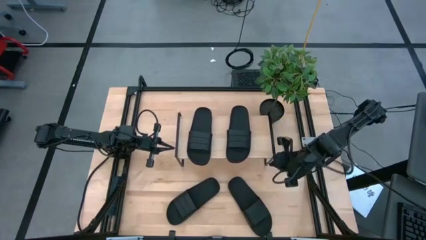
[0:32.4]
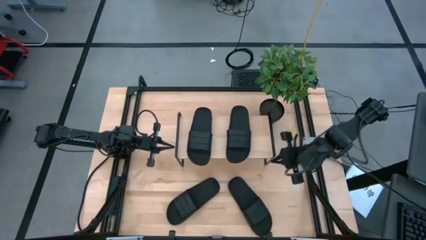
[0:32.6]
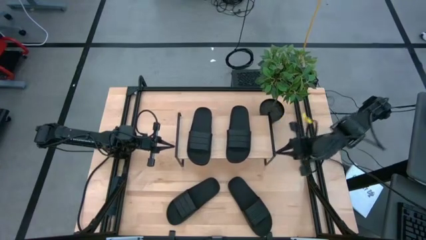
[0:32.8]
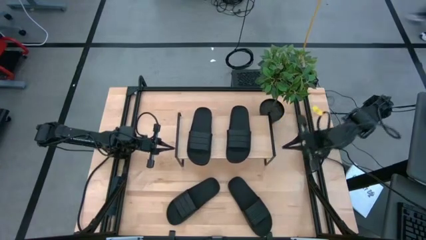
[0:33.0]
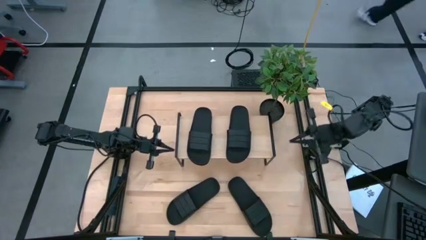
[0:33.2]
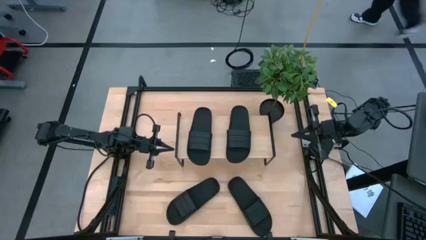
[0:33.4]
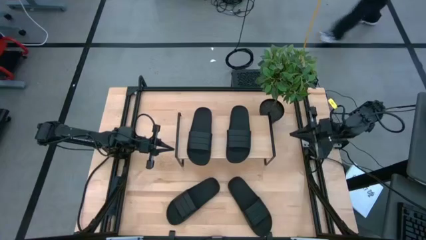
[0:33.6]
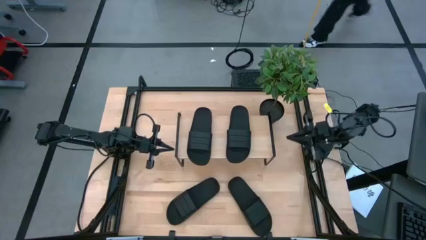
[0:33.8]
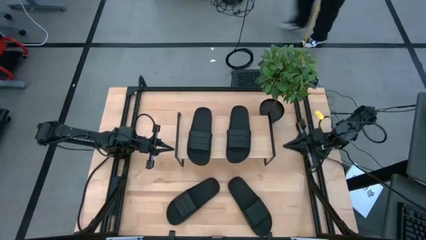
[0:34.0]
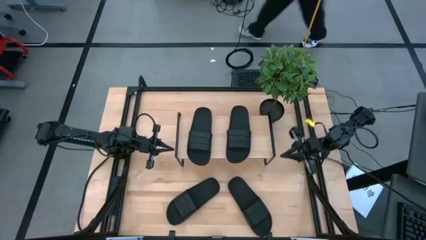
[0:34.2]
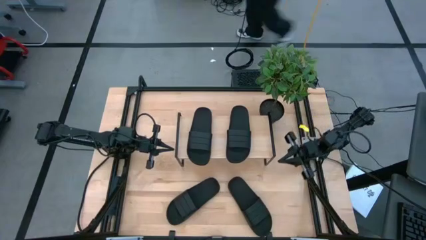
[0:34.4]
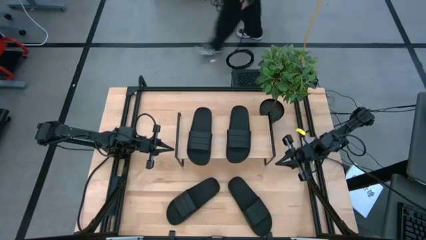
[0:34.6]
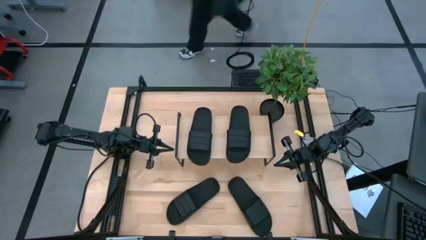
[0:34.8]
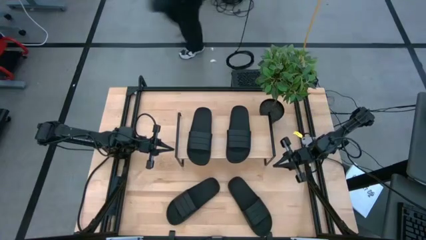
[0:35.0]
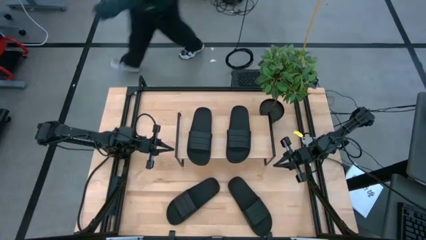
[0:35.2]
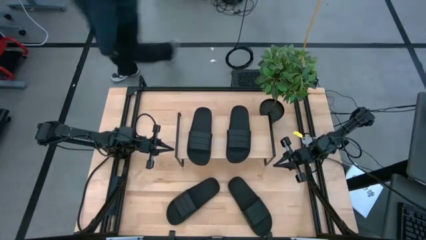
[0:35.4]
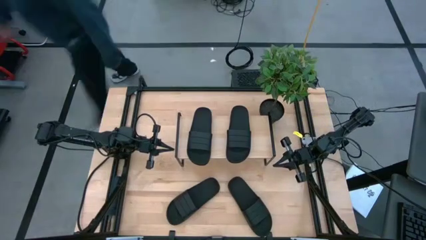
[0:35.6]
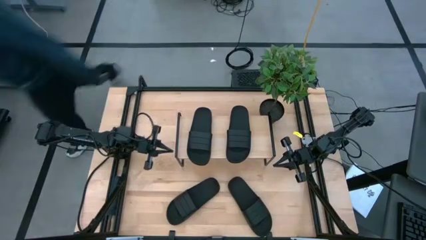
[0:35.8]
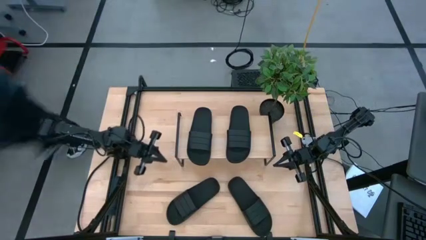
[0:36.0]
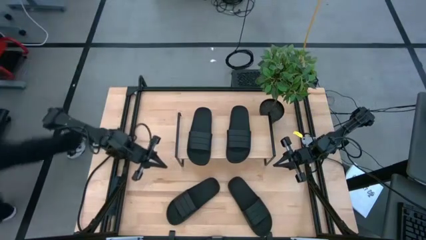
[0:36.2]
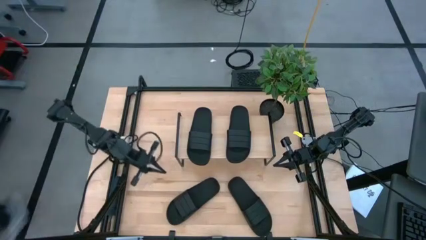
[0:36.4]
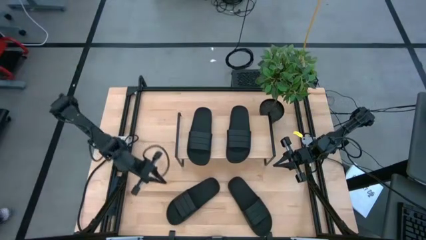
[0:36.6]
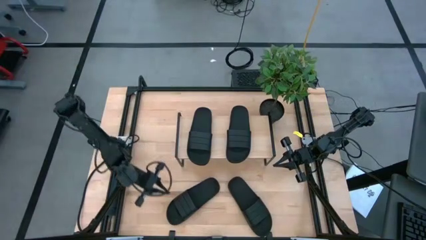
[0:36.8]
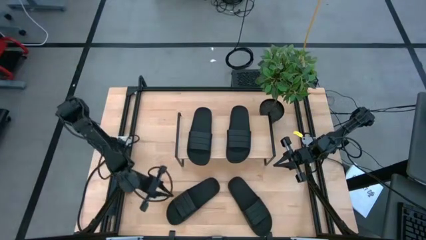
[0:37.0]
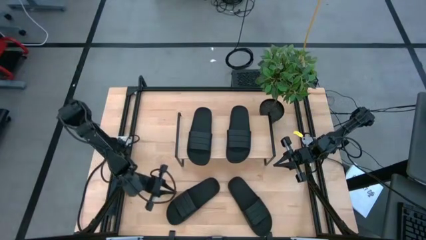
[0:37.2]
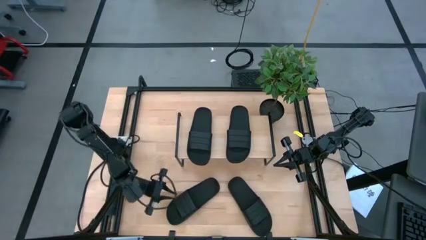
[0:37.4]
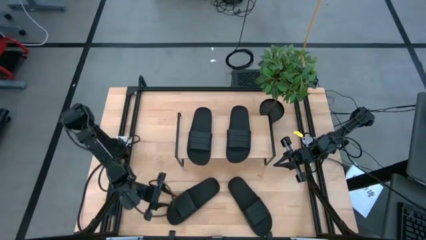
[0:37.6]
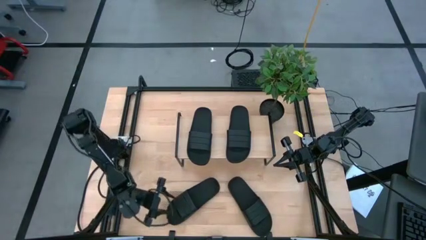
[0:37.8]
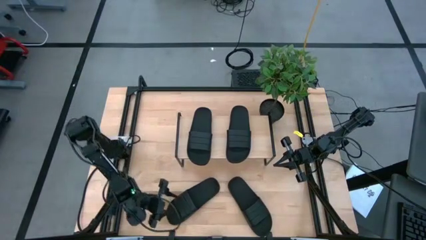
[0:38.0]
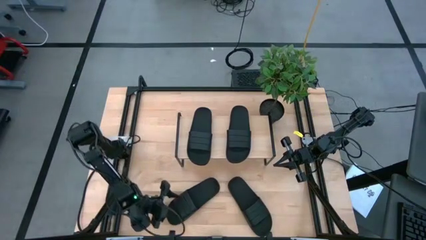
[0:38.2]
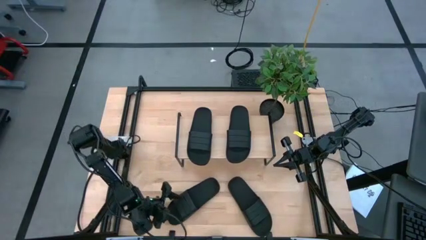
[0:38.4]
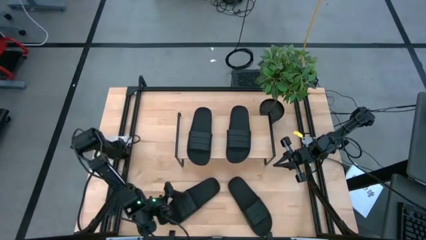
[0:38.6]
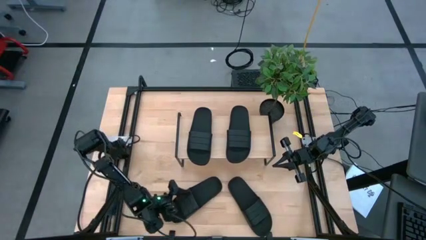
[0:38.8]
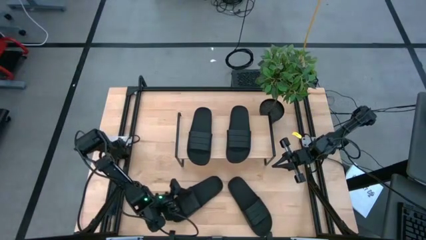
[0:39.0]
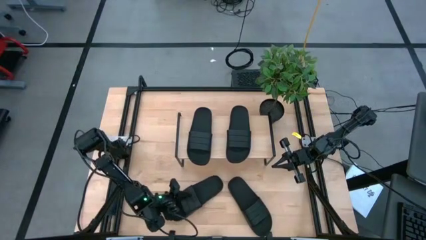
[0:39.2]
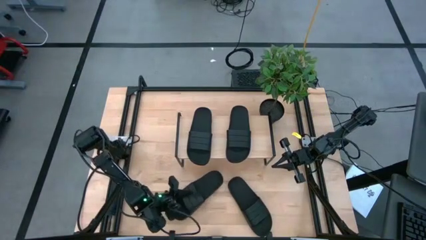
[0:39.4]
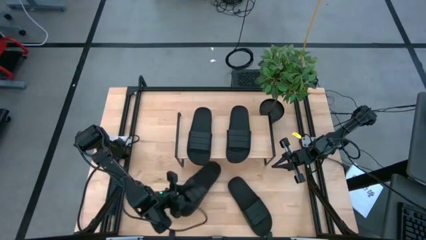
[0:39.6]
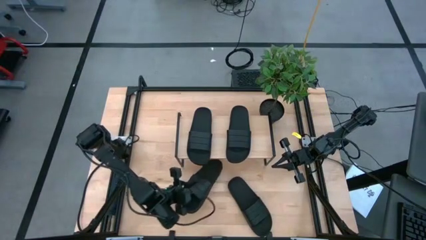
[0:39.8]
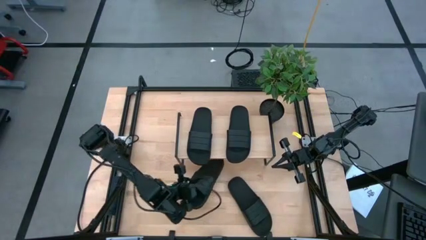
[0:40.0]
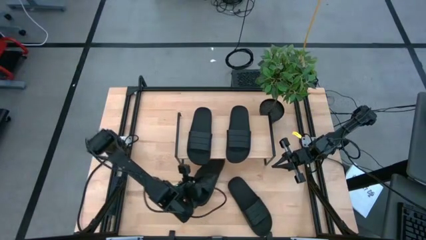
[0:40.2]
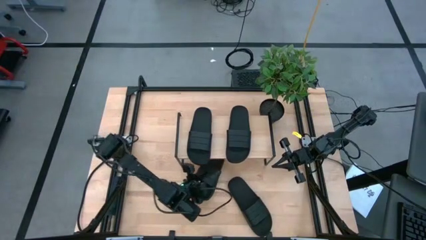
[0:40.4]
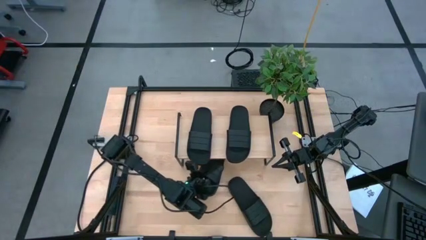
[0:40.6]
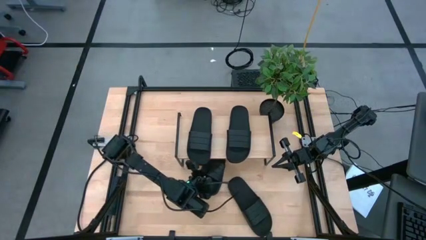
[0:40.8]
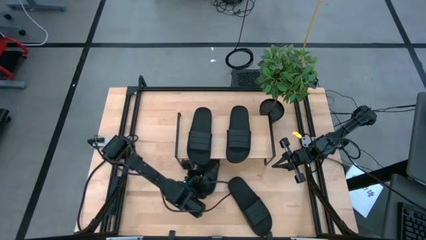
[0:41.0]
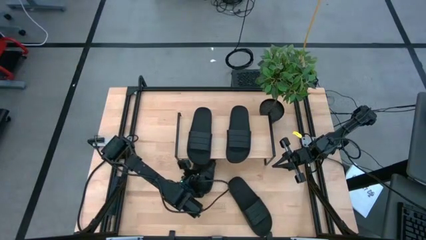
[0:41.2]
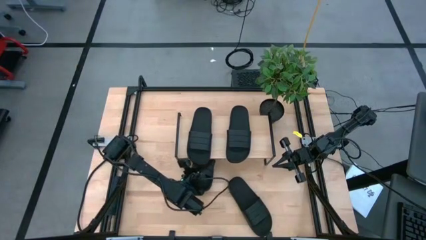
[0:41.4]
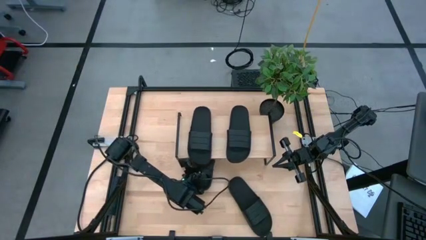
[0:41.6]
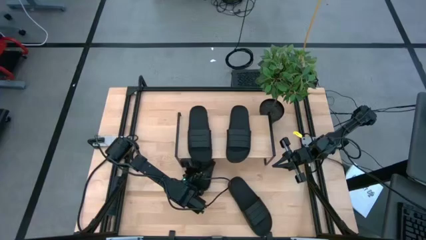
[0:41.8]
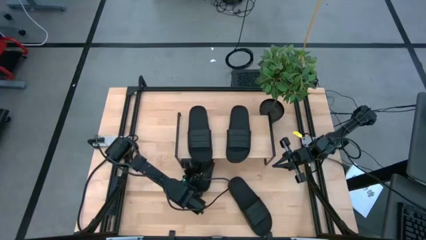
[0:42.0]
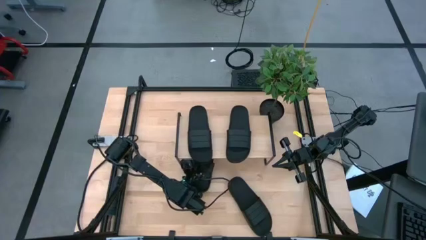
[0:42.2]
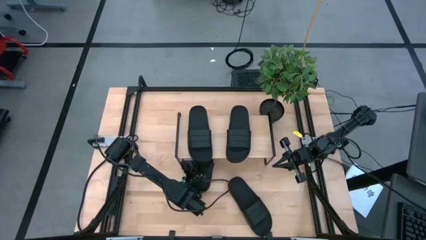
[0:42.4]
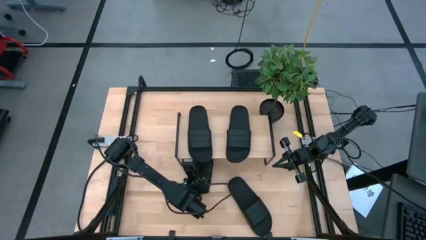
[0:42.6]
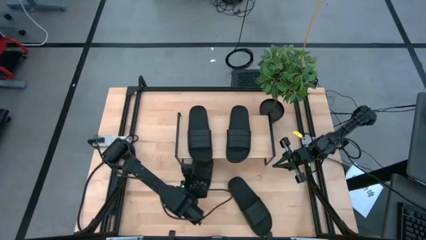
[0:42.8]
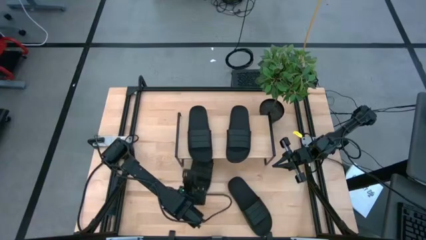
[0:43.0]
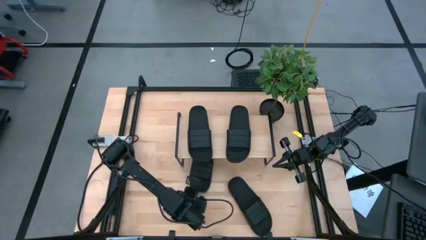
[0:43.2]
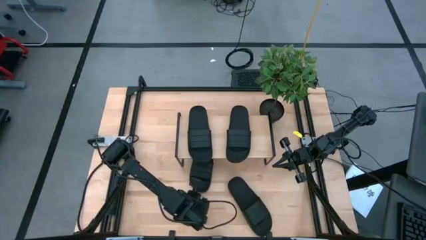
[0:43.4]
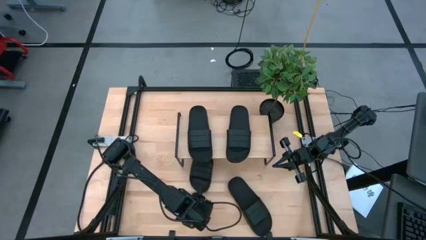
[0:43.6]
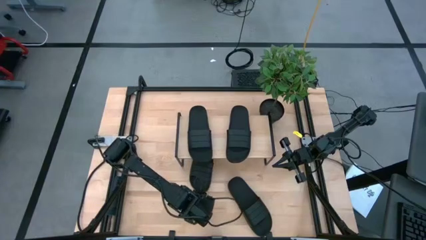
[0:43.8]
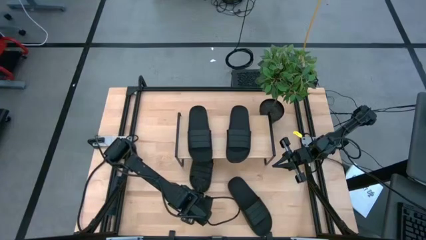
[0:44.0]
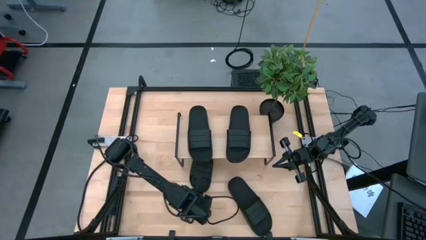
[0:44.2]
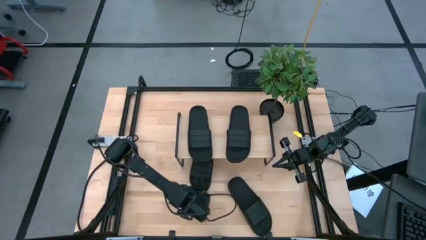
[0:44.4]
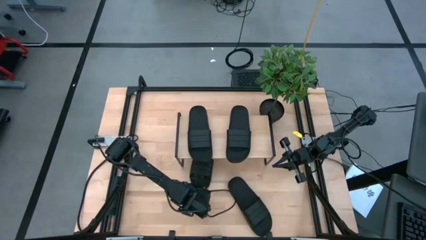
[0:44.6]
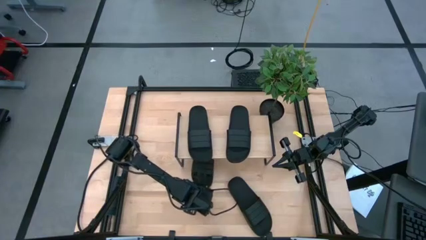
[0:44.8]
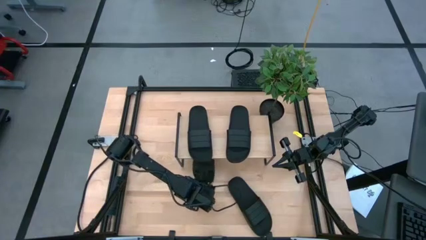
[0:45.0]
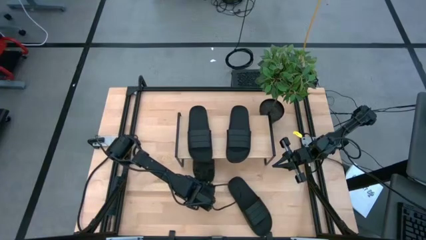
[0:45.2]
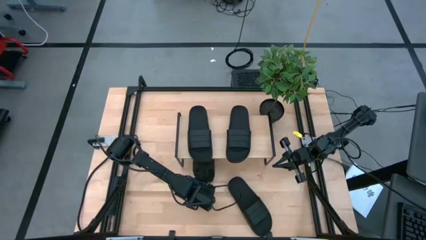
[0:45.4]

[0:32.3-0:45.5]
Task: Pick and place slides into the shelf
Put the black slipper under the shelf

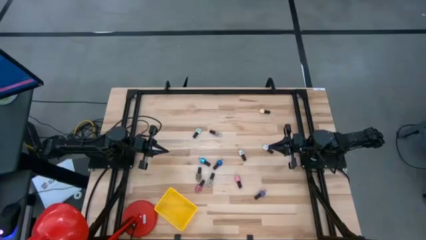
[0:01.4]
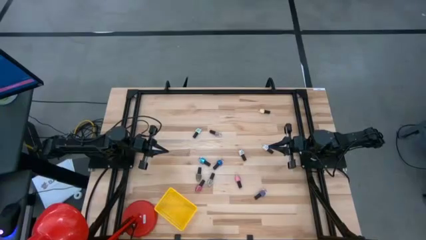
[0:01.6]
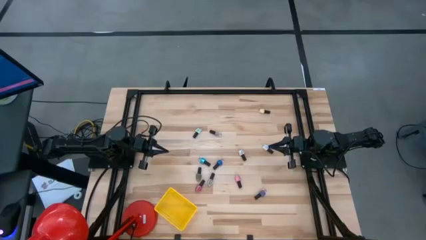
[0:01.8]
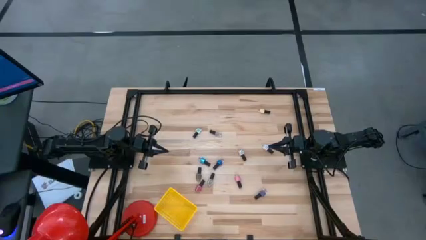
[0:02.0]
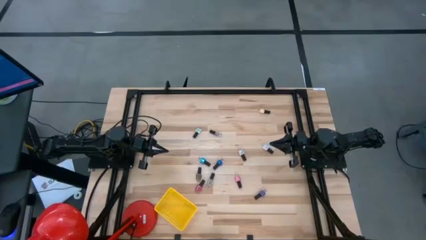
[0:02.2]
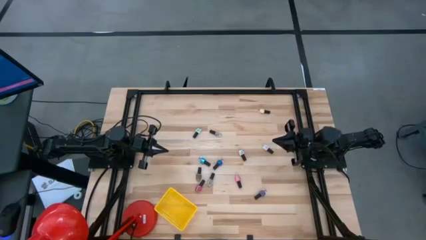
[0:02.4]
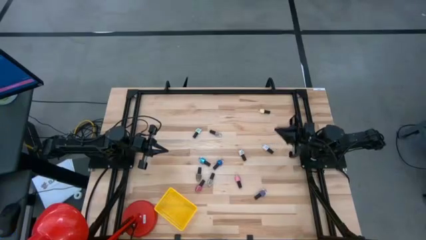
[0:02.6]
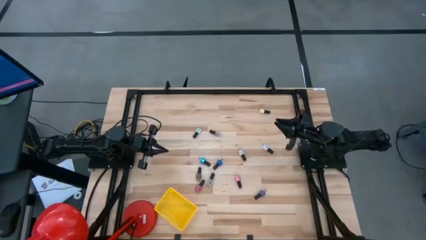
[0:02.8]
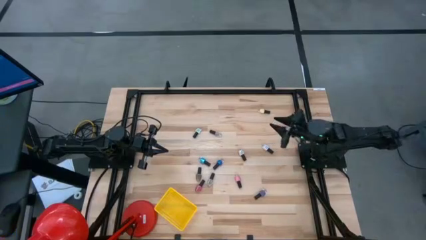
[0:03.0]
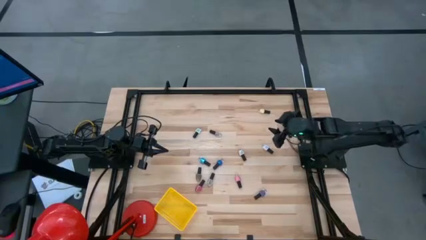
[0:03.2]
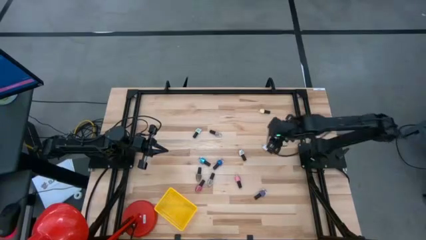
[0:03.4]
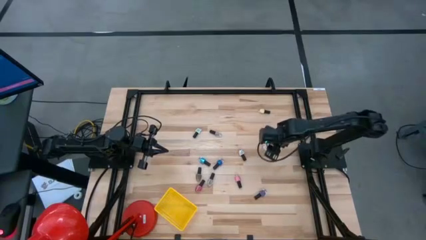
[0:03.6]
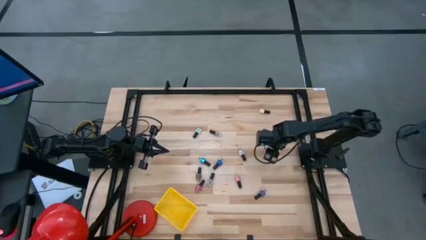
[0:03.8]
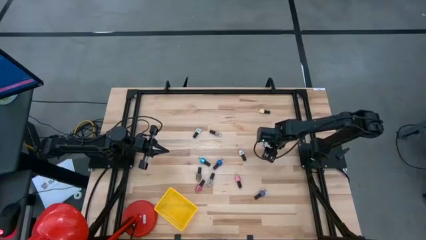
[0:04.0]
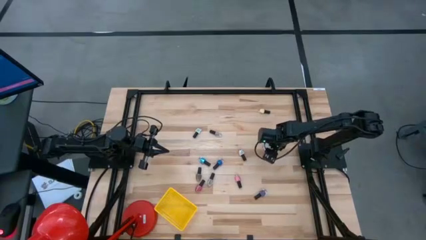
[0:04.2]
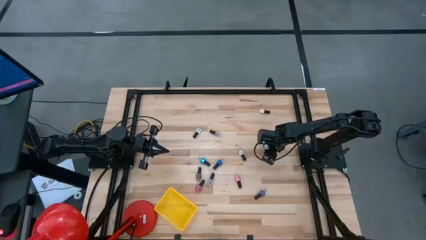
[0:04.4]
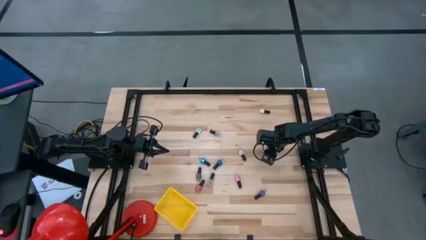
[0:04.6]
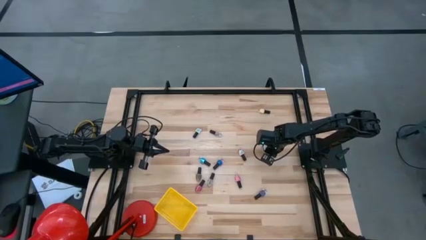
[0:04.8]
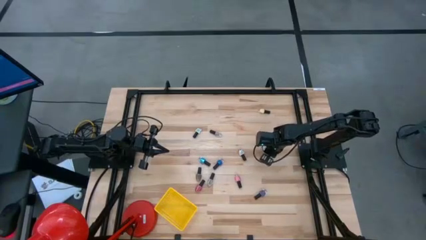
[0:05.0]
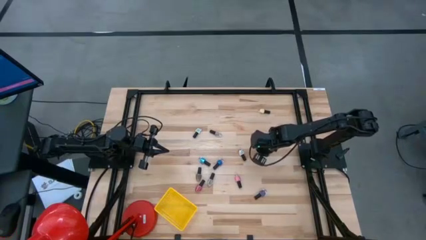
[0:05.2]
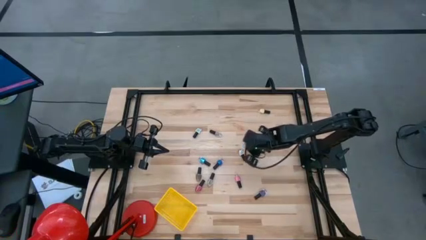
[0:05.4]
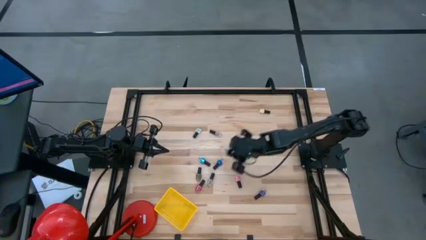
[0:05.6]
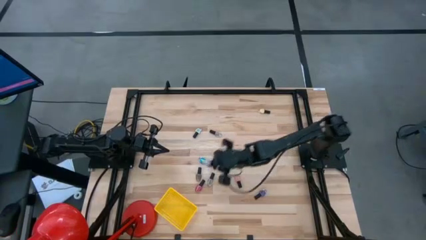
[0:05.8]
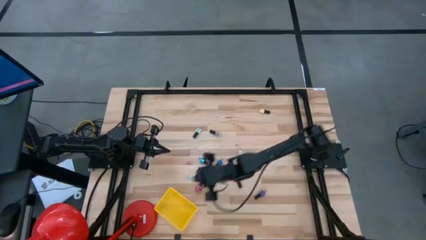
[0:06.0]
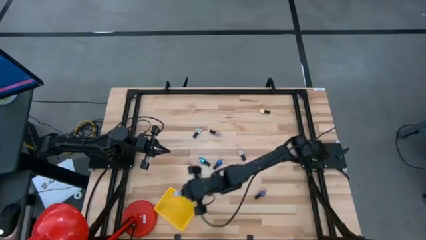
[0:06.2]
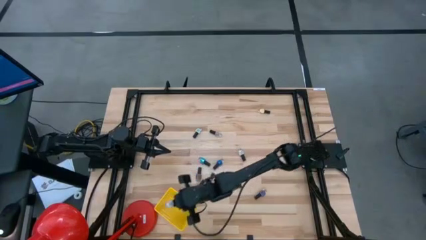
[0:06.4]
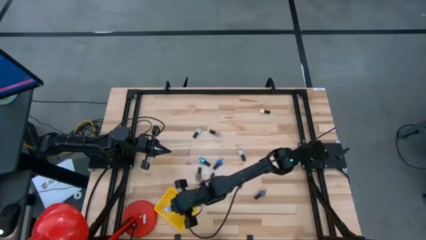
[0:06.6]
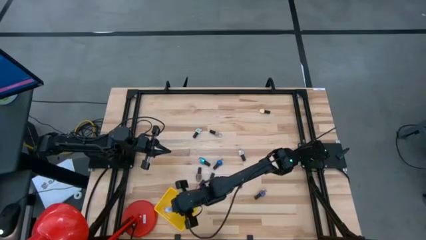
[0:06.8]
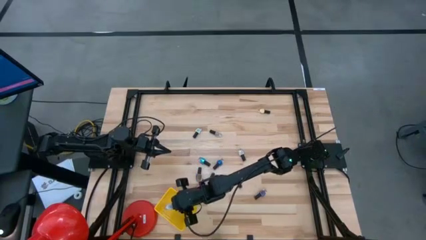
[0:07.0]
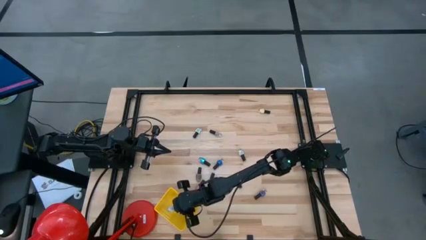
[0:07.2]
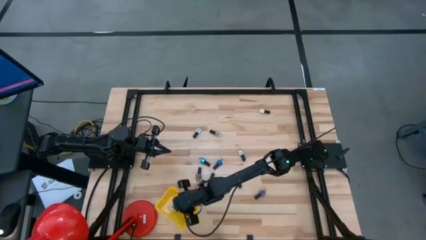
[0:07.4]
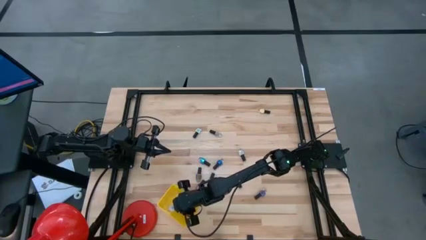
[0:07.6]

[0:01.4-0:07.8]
Task: Pick & Place Nail Polish
Put the right white nail polish into the yellow basket
